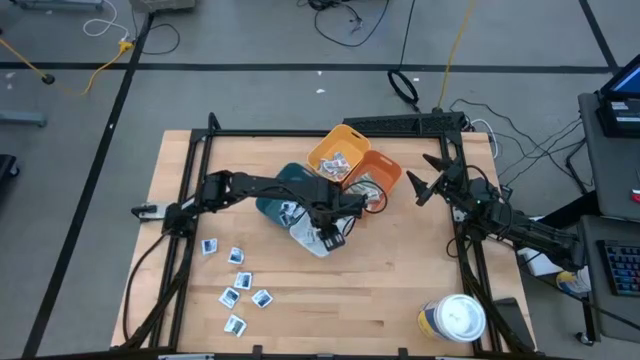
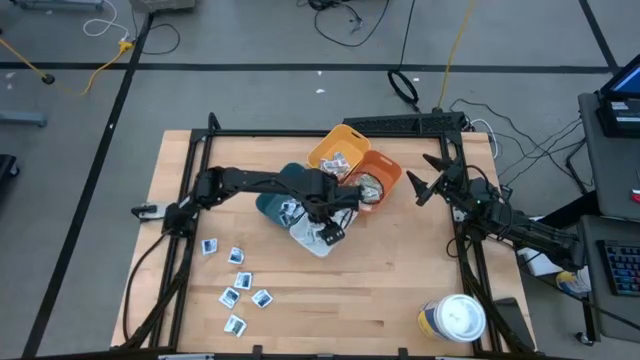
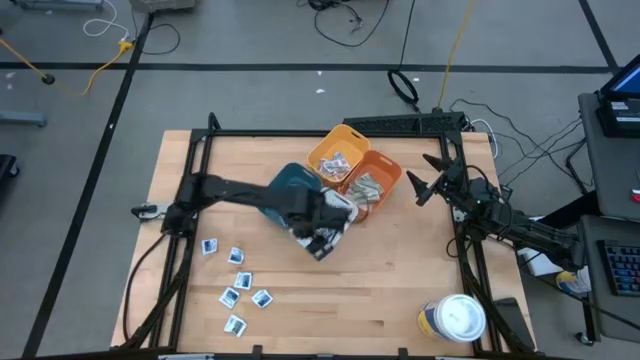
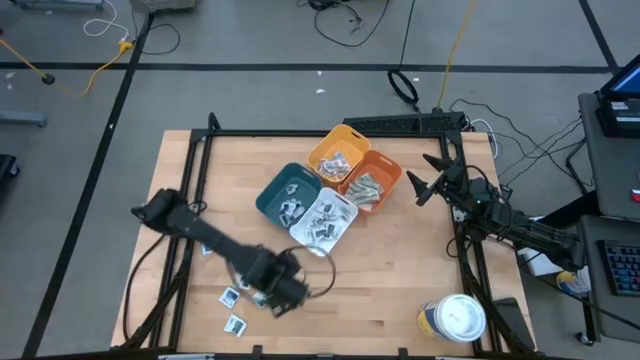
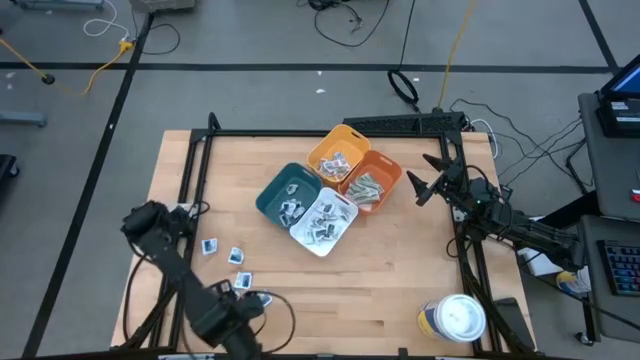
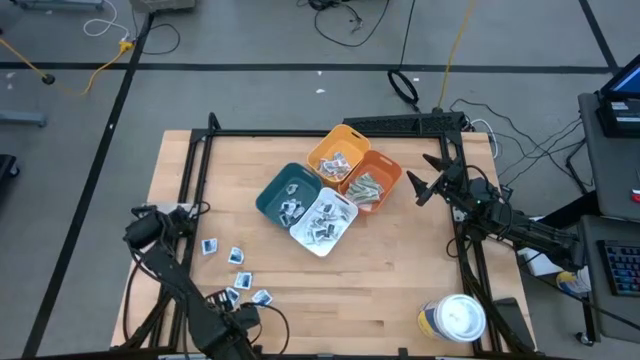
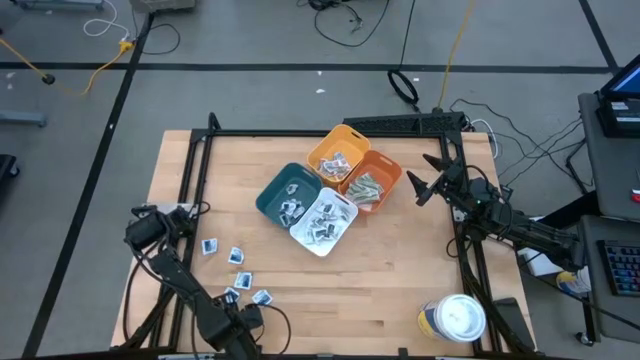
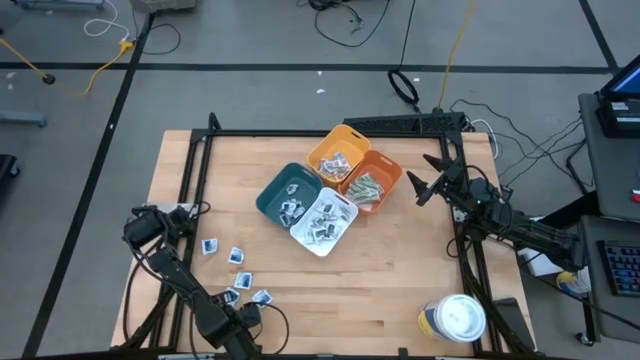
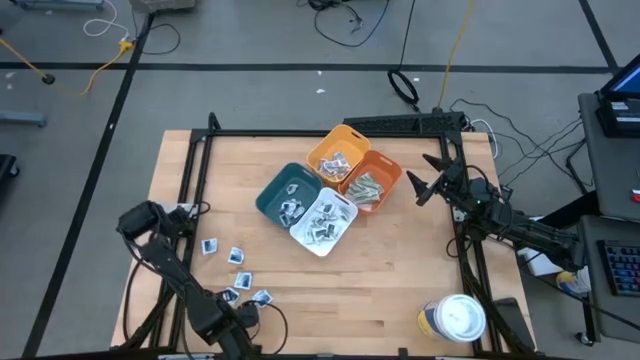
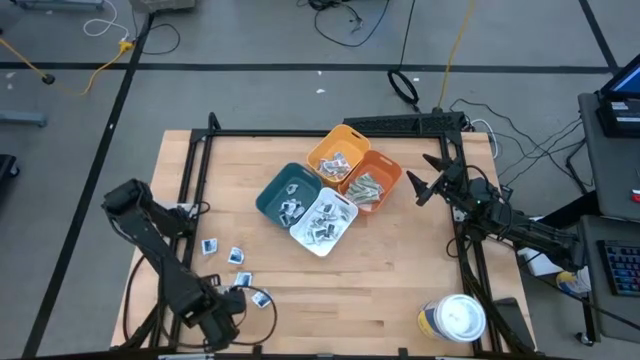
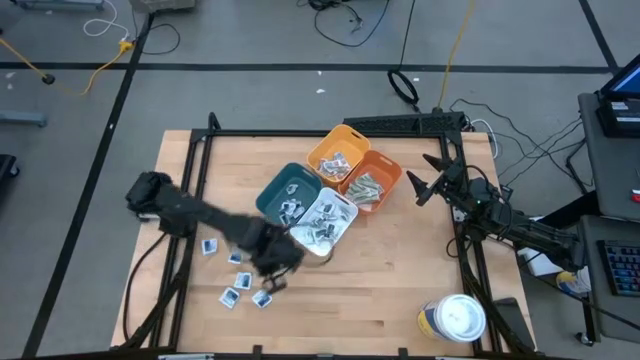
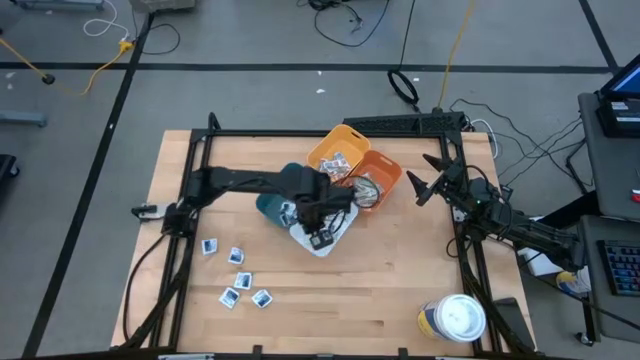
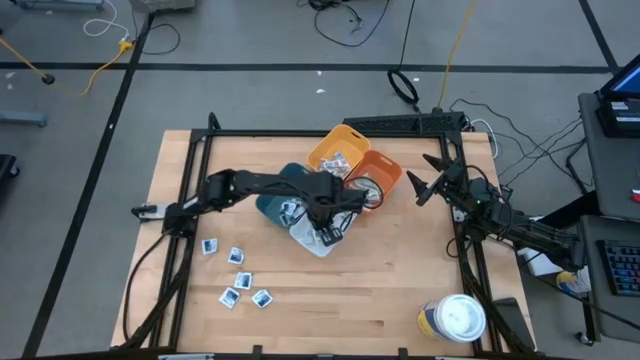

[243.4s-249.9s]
Task: Pick & Place First Aid Supplies
Put the black towelette pack into the white bin

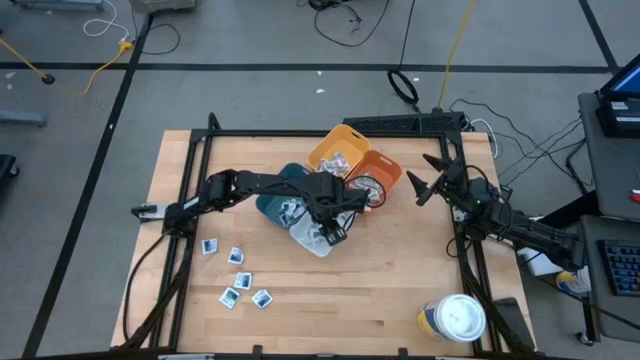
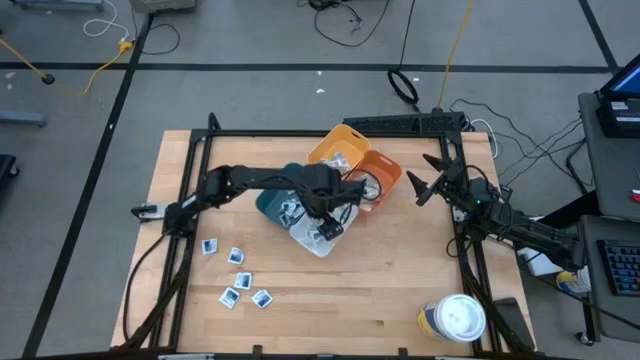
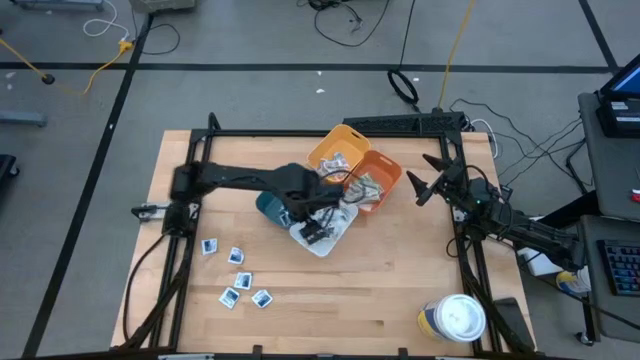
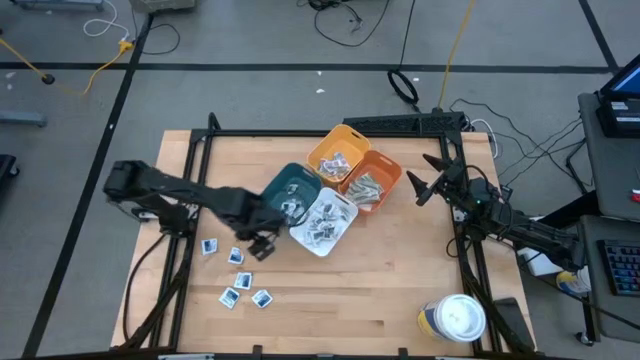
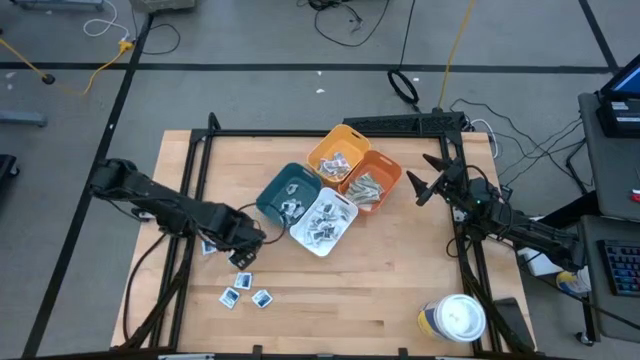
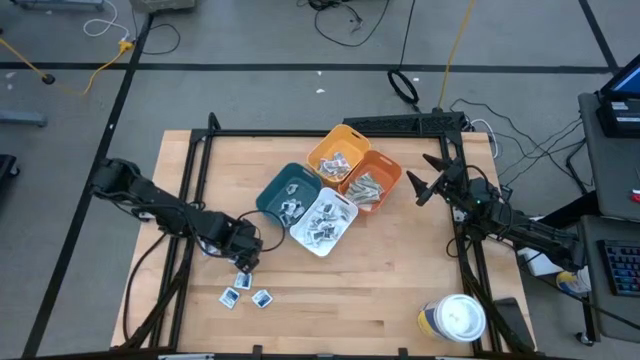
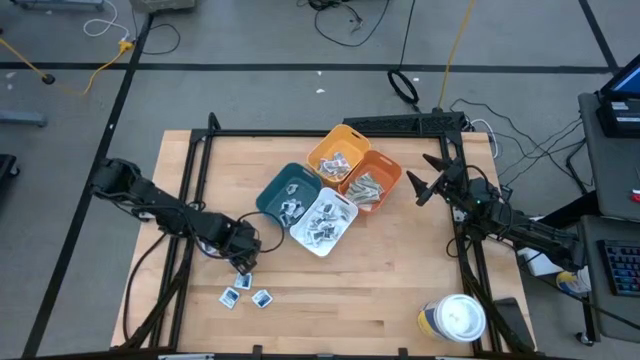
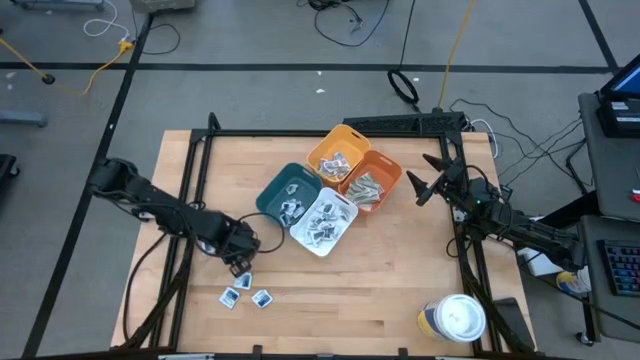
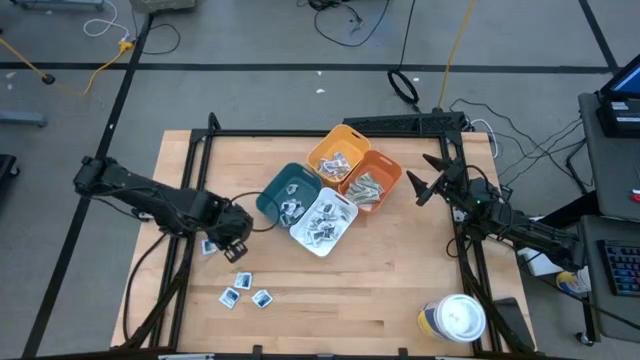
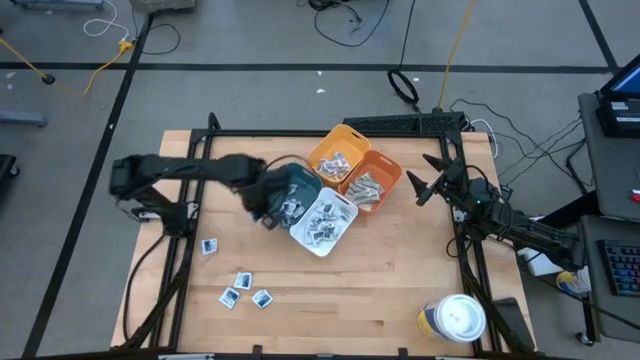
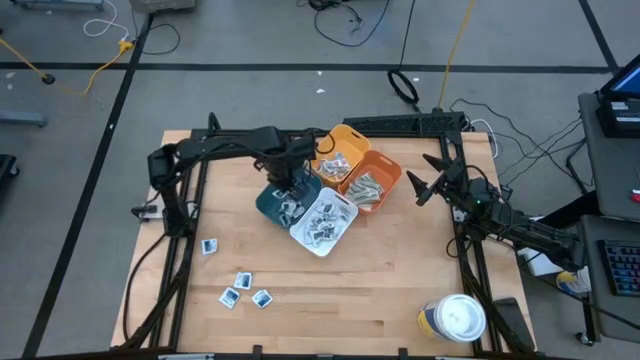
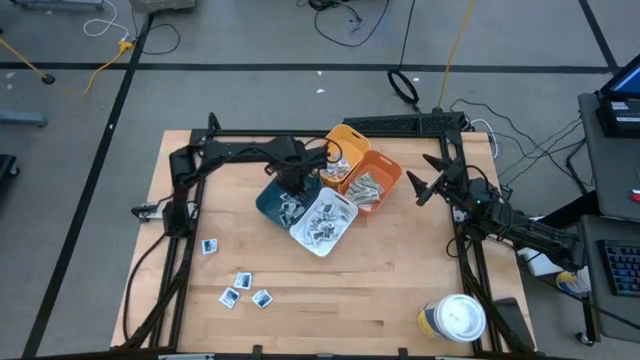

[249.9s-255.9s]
Put the blue alcohol pad into the blue bin

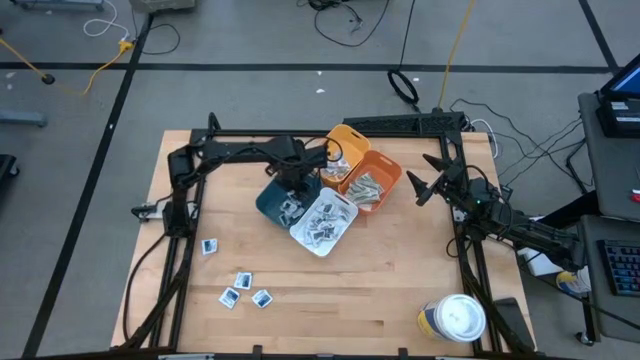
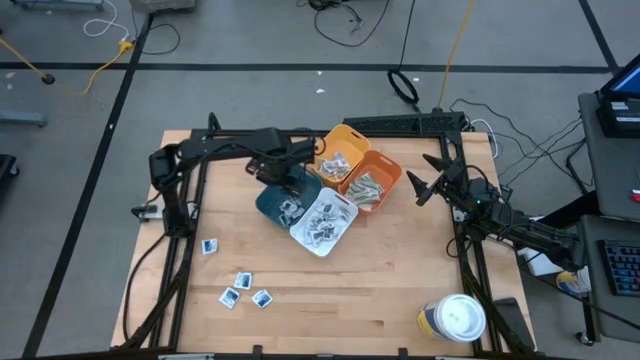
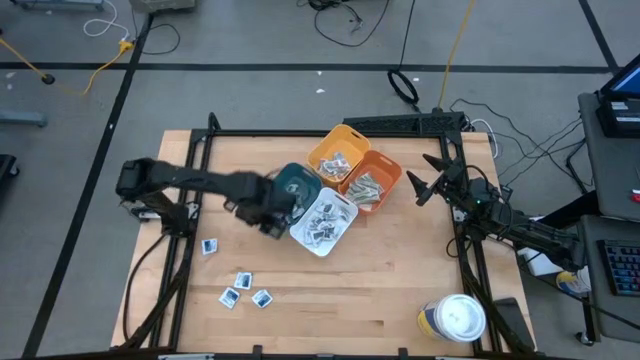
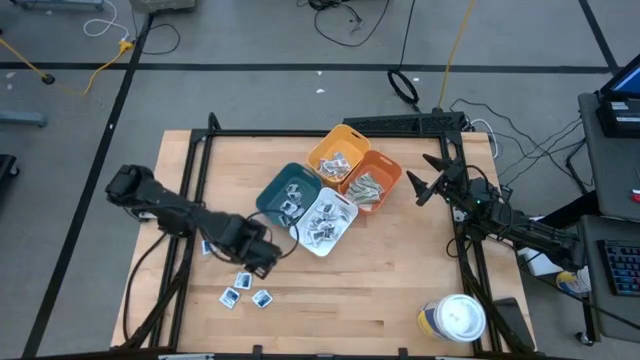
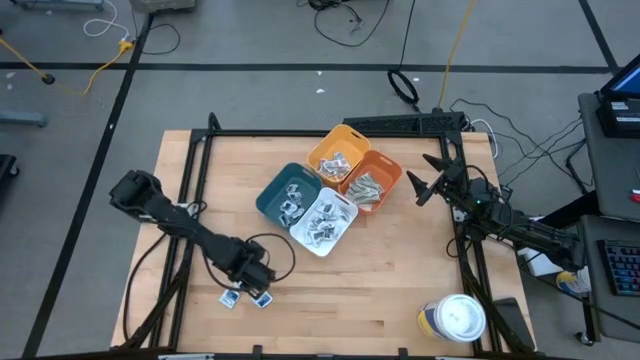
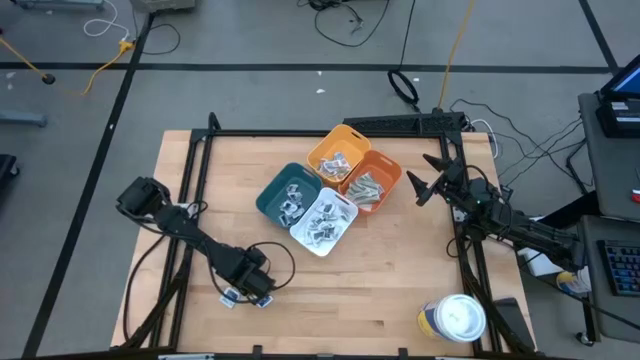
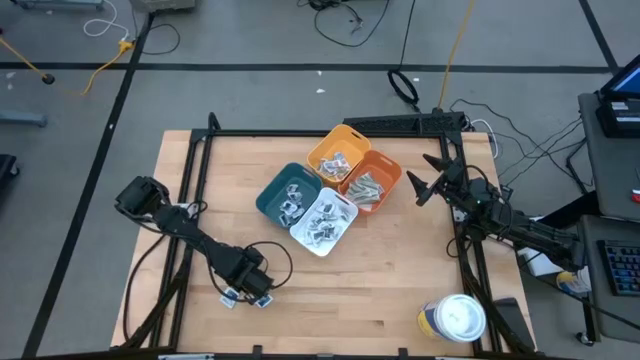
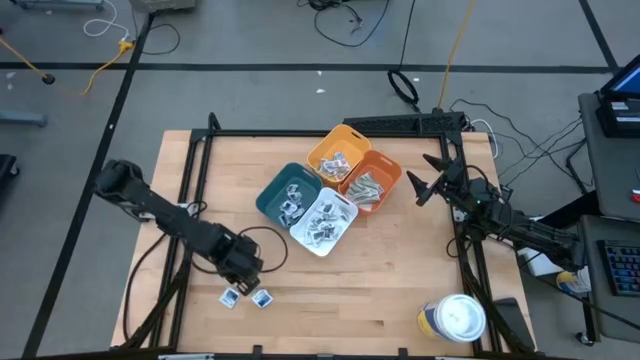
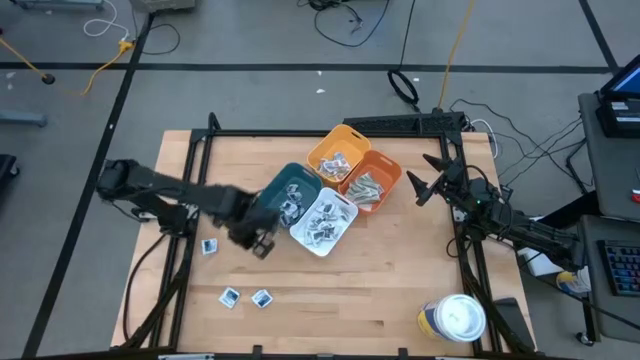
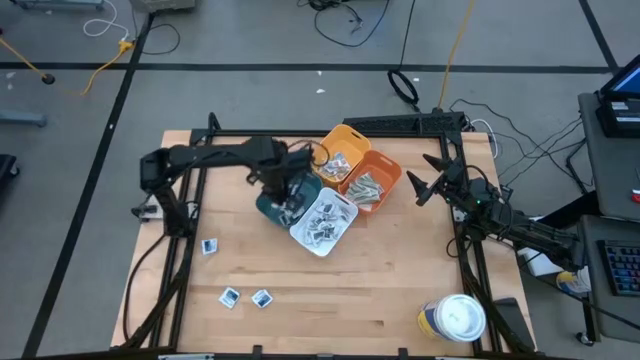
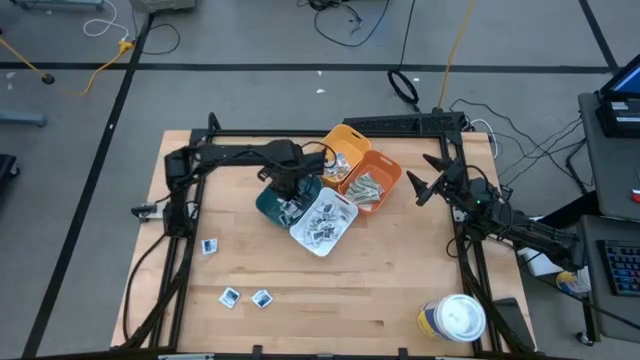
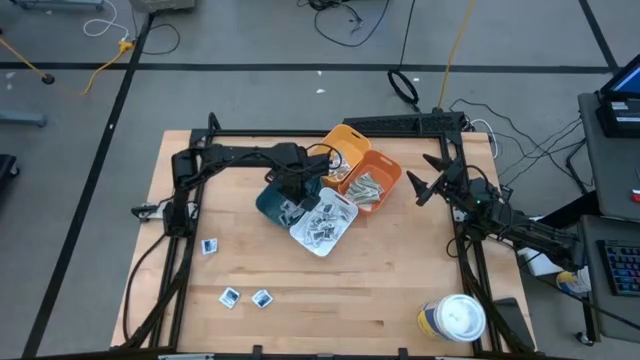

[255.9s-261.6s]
Put the blue alcohol pad into the blue bin

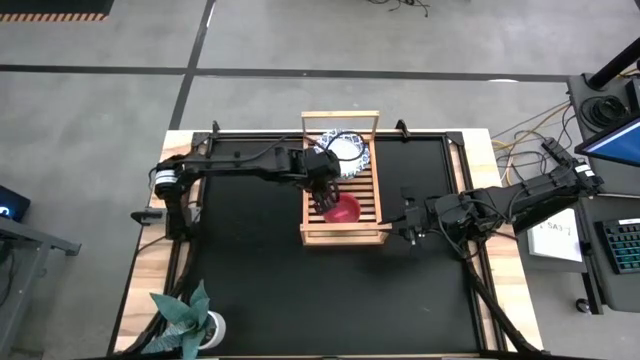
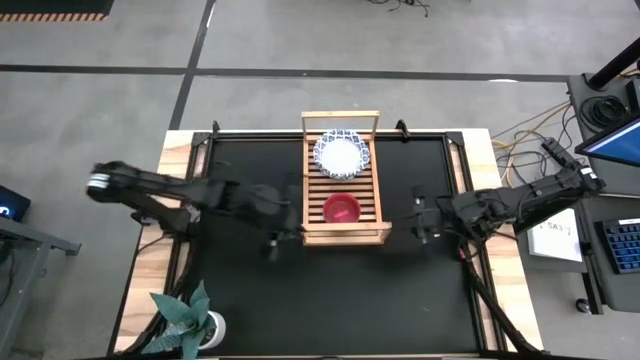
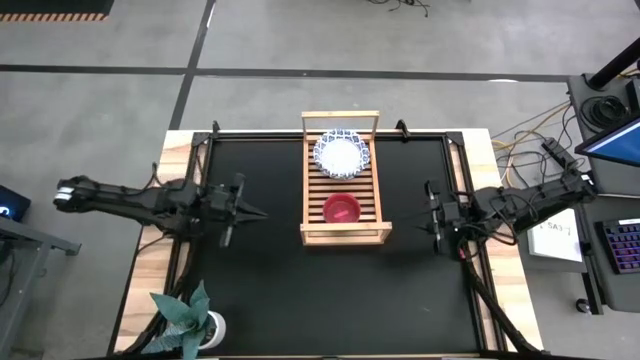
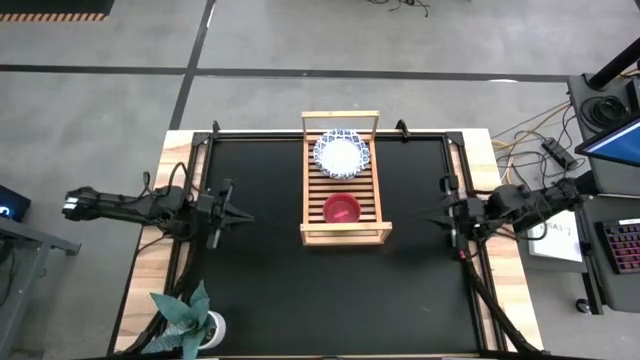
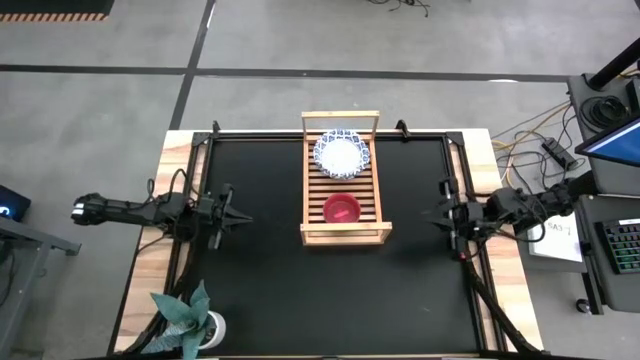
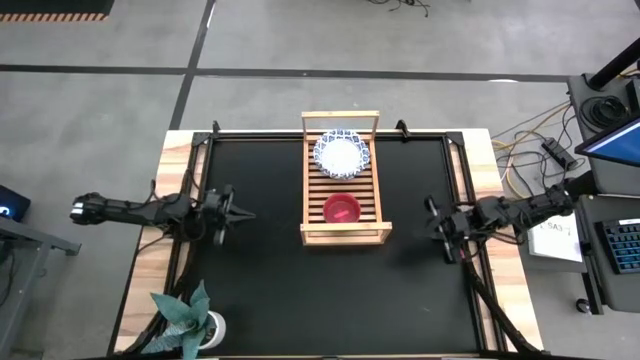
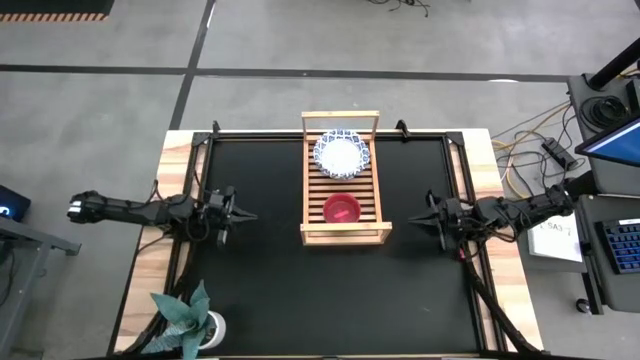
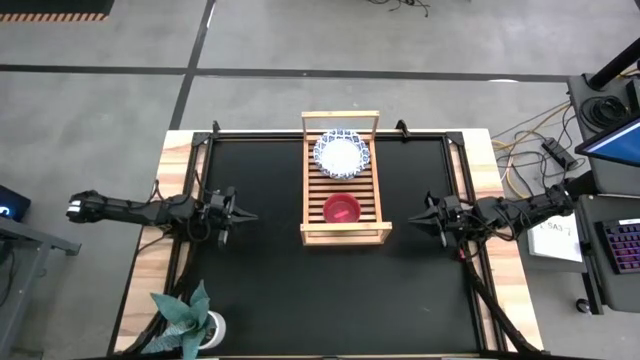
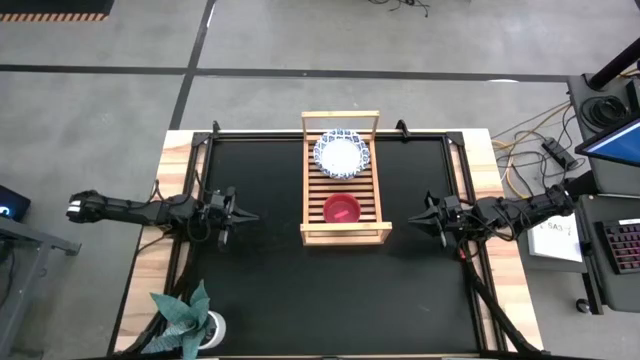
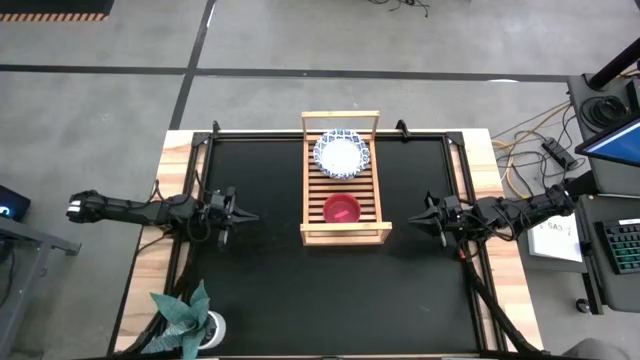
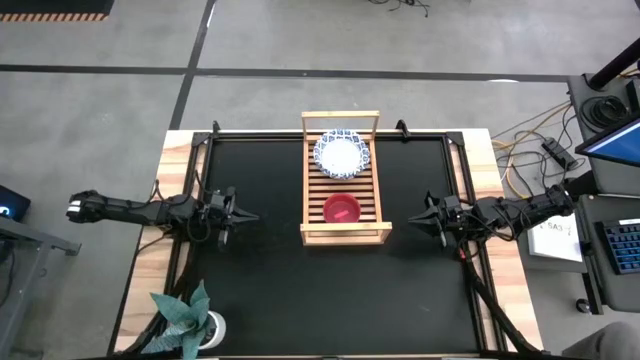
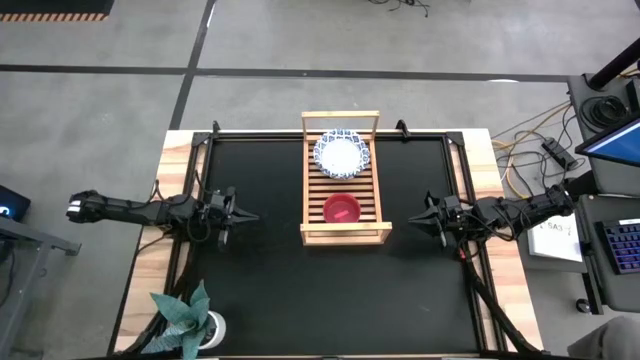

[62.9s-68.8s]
Task: Place and stack bowls onto a shelf
Return to Home Position
